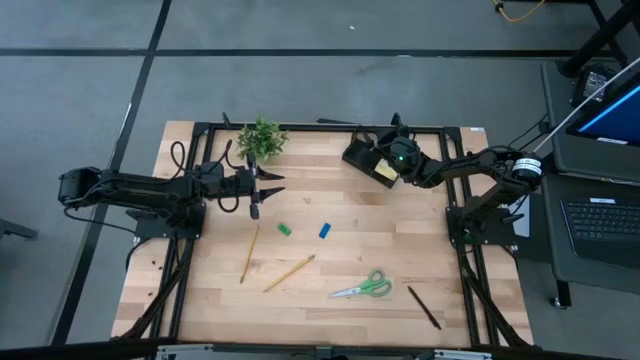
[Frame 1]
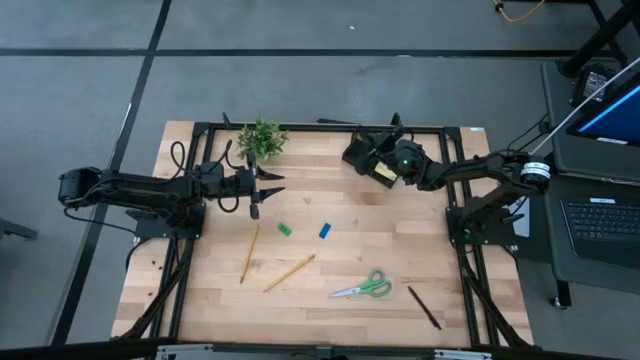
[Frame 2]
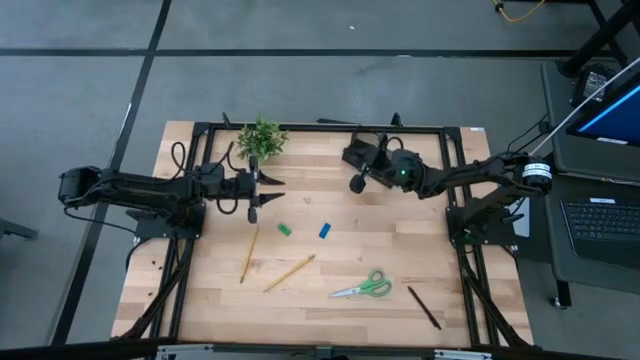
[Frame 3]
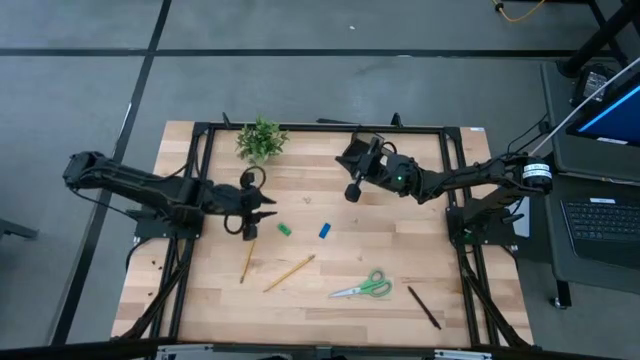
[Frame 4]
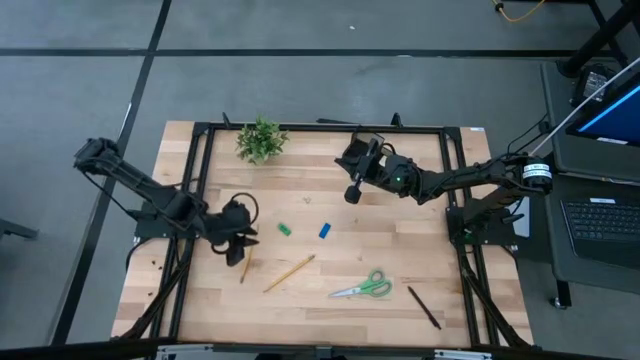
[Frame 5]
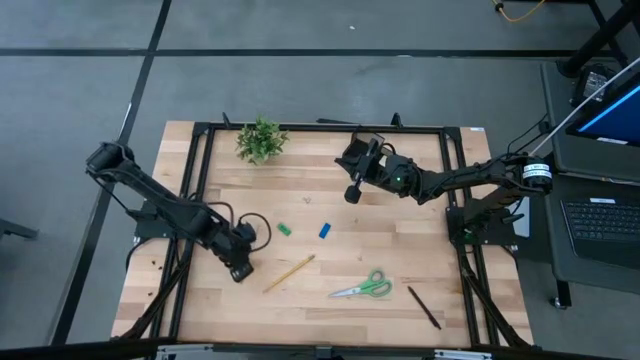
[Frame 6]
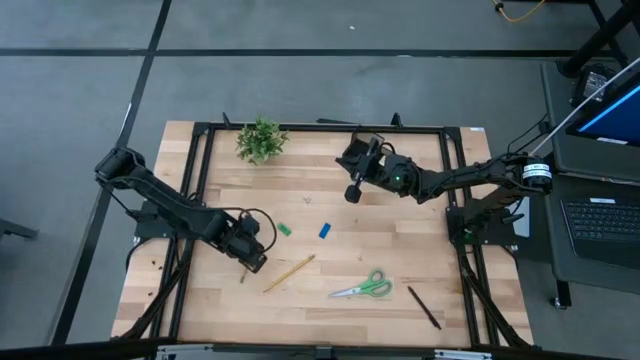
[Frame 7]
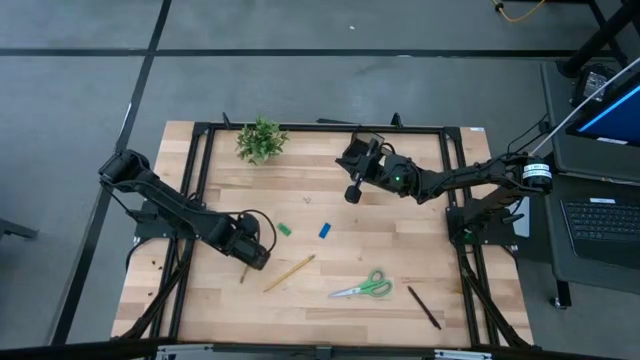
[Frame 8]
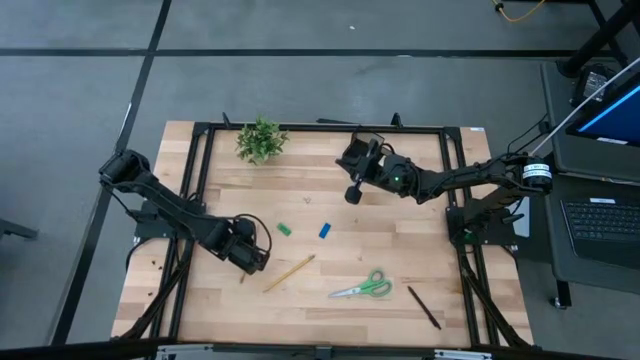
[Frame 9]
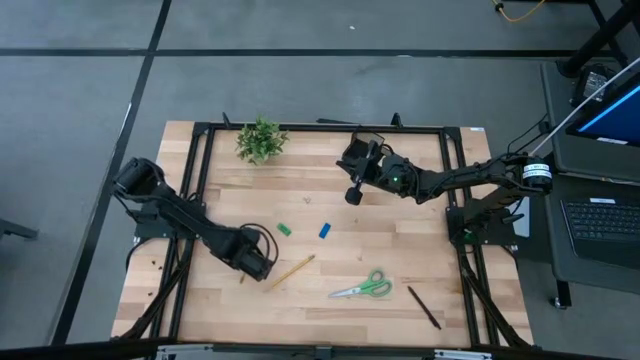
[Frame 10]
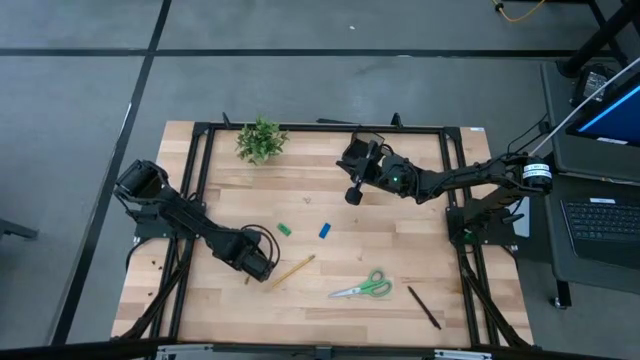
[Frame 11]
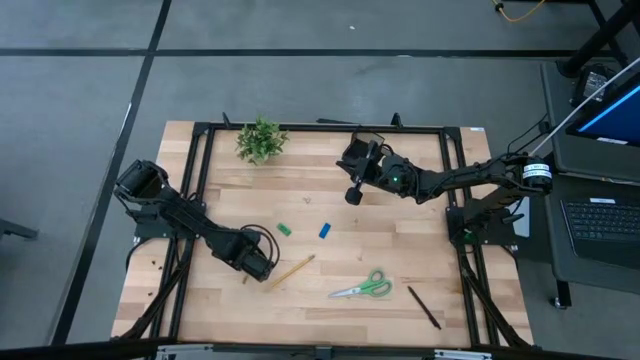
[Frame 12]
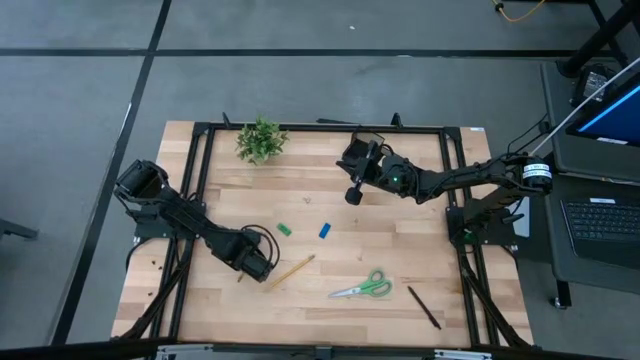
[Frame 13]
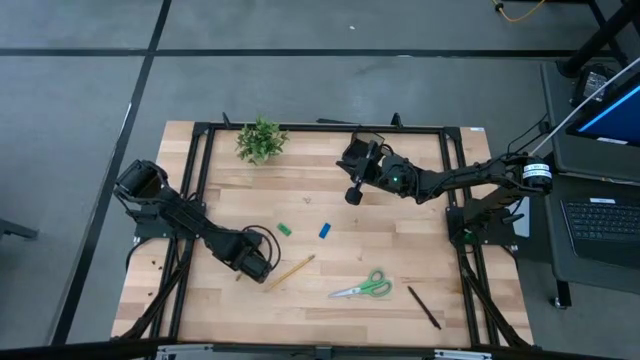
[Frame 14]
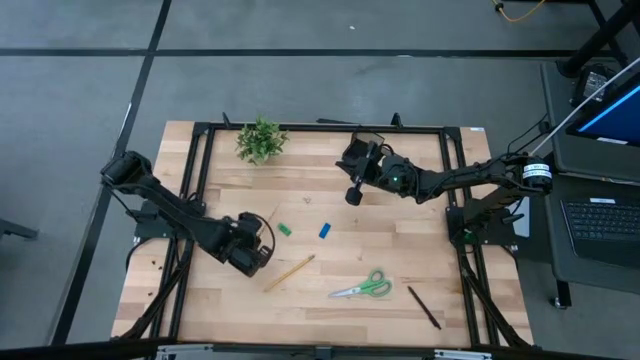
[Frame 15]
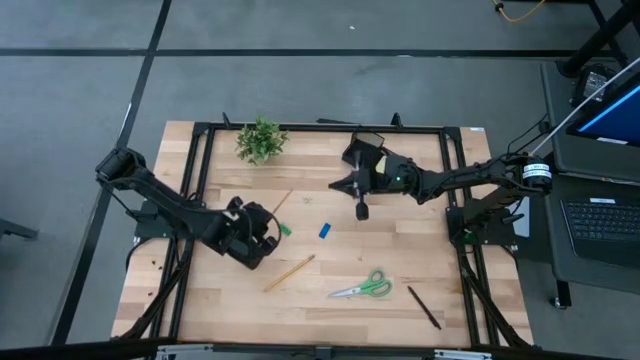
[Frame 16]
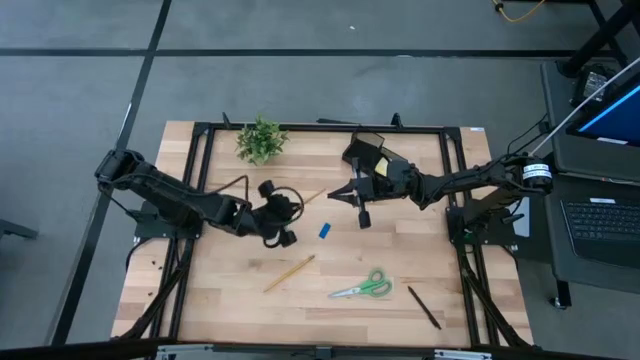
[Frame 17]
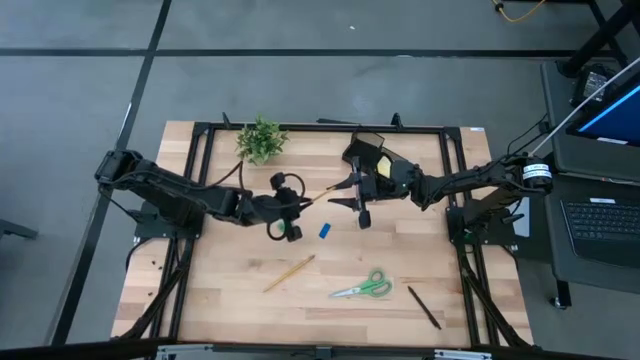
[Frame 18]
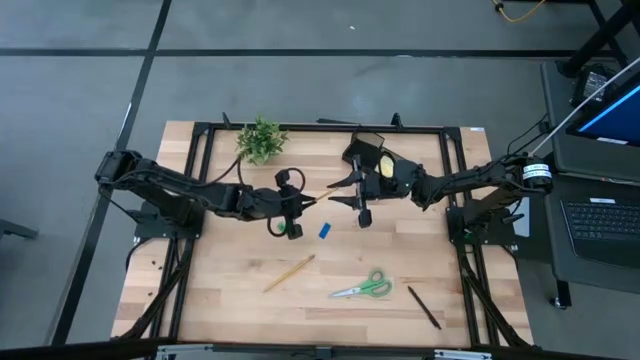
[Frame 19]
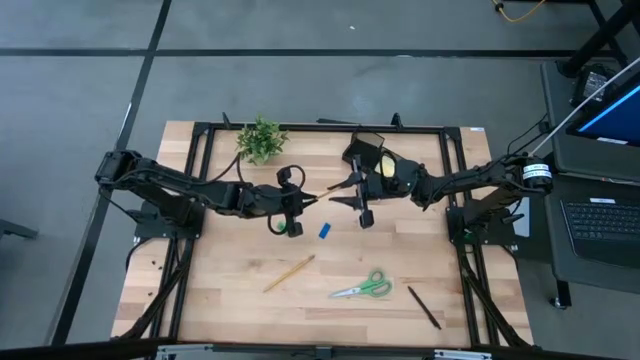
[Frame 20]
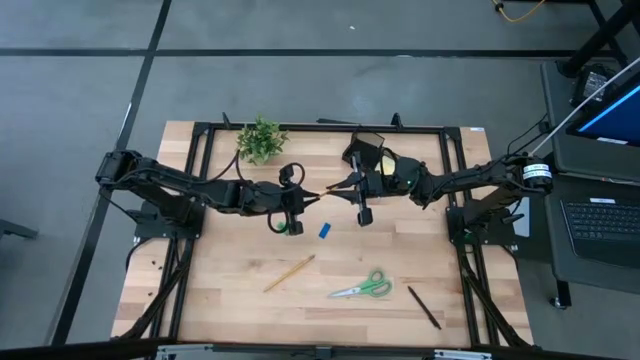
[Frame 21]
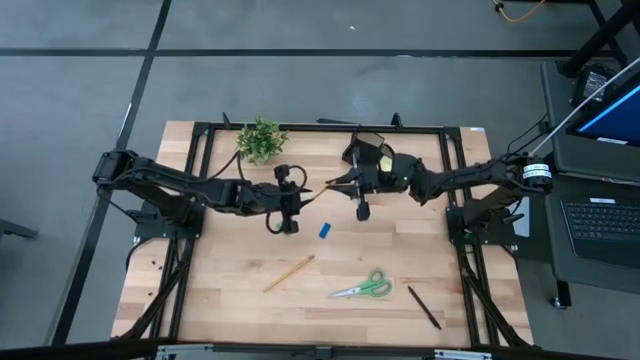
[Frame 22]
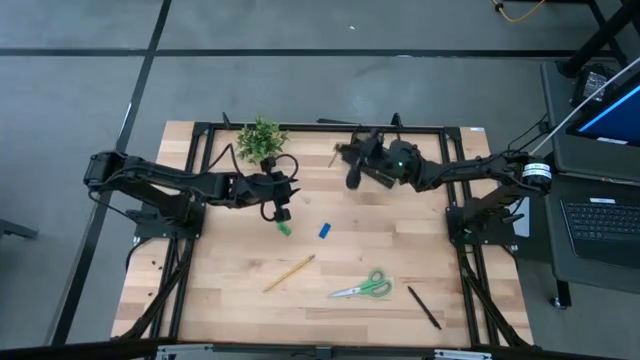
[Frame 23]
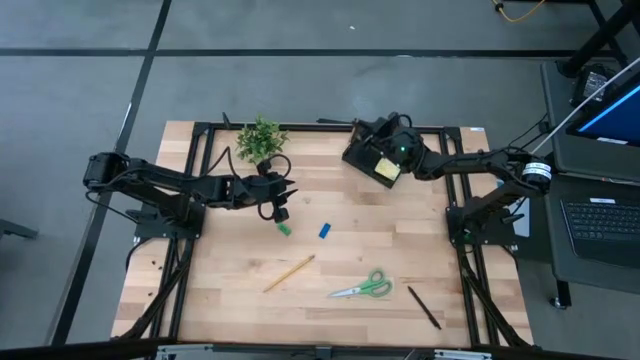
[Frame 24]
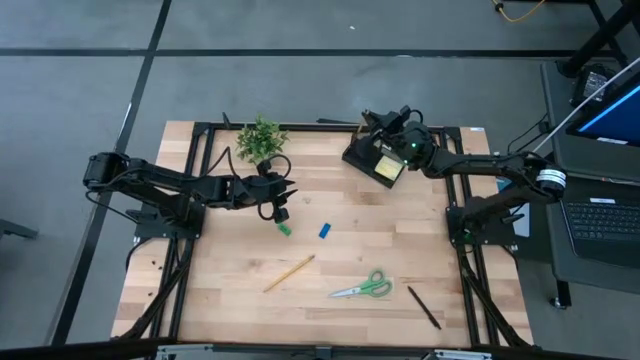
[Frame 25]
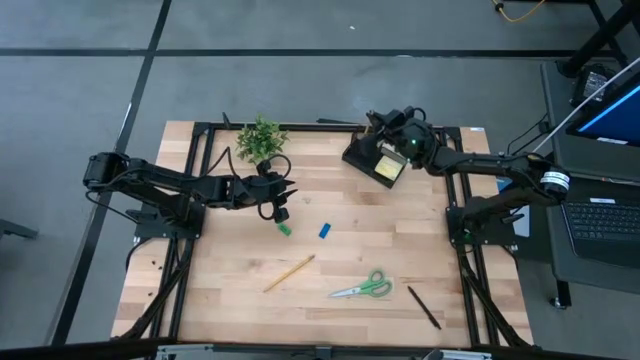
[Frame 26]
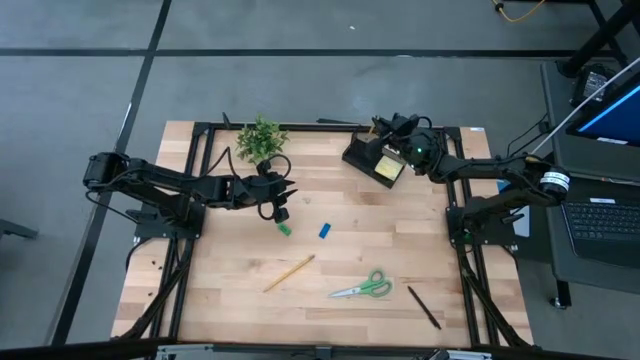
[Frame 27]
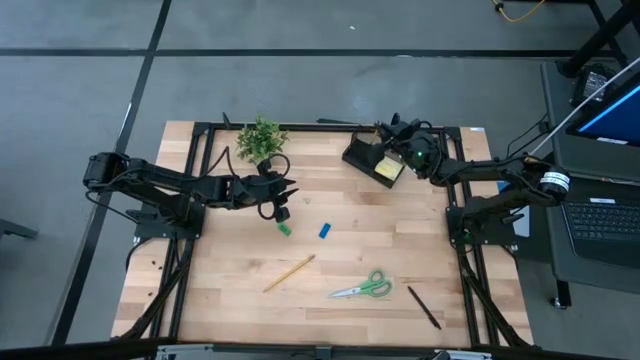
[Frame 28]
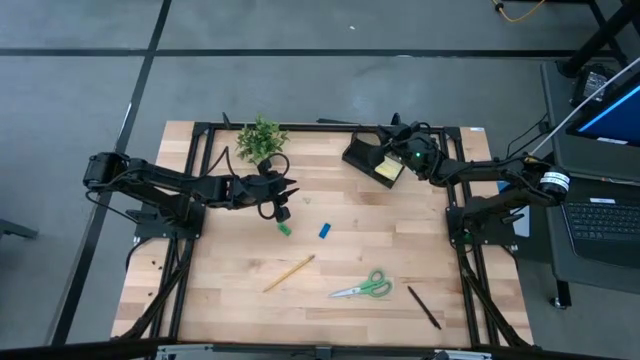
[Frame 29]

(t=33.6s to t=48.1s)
Task: Pick and place office supplies into organizer
Put the left yellow pencil into the black desk organizer

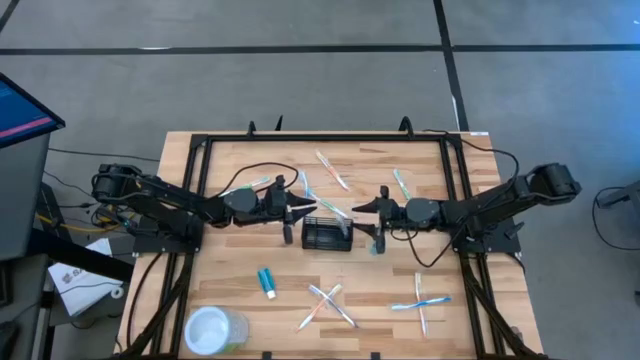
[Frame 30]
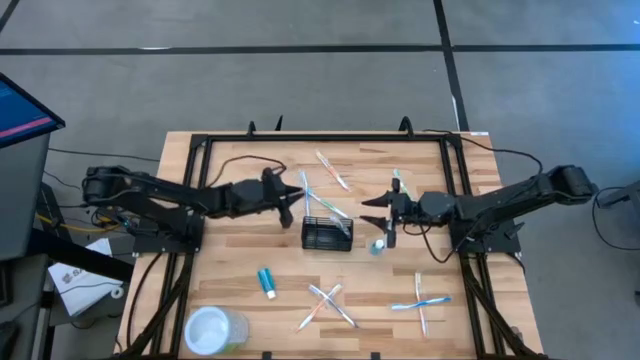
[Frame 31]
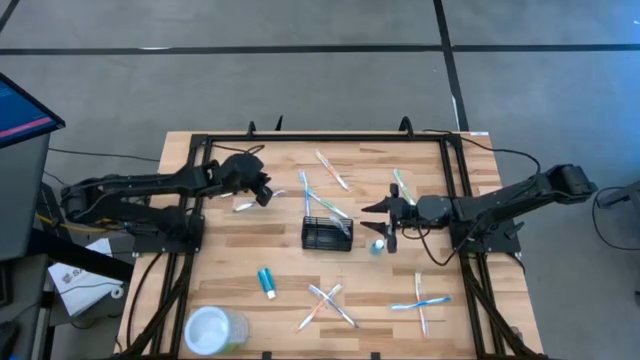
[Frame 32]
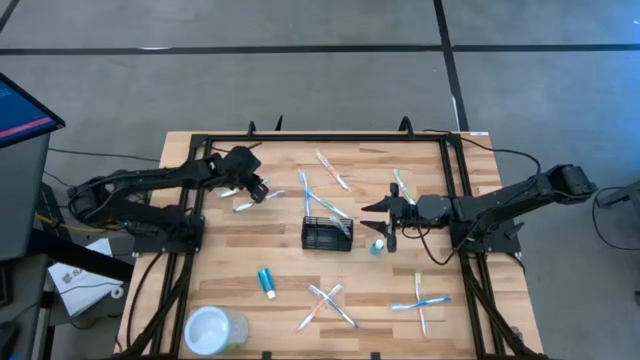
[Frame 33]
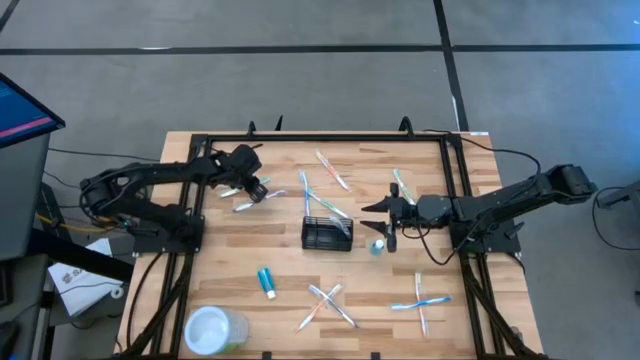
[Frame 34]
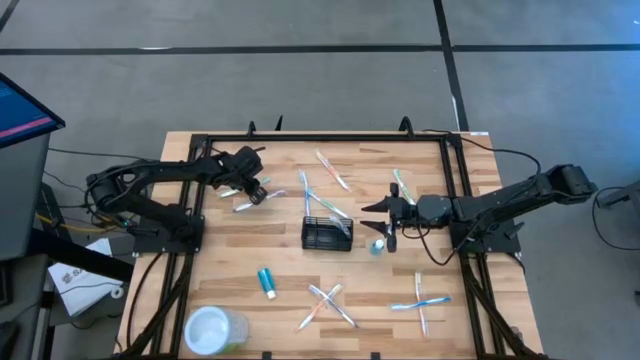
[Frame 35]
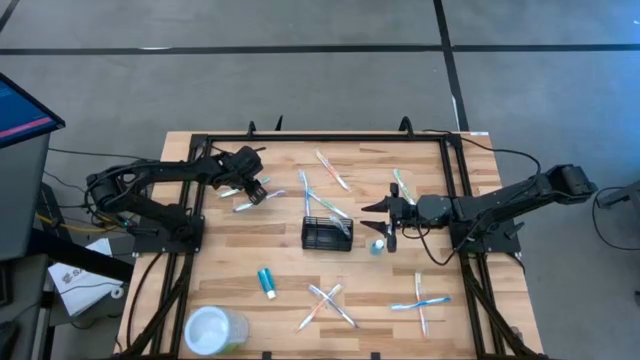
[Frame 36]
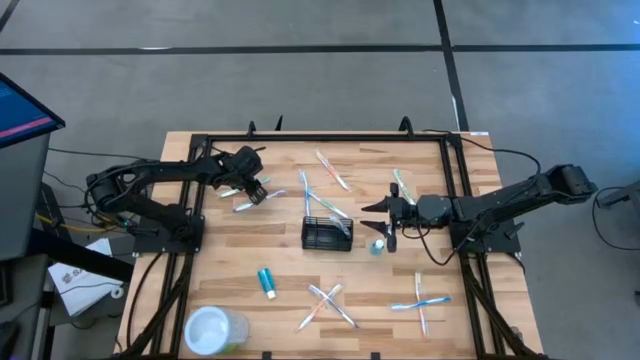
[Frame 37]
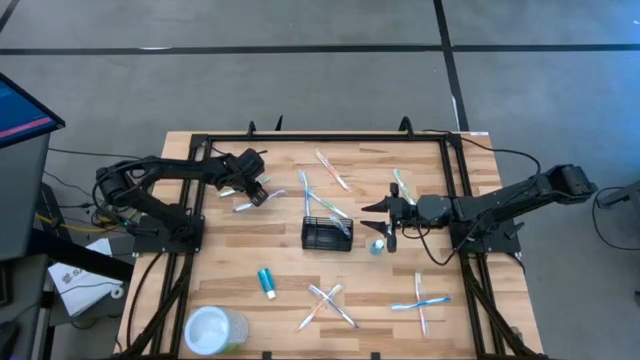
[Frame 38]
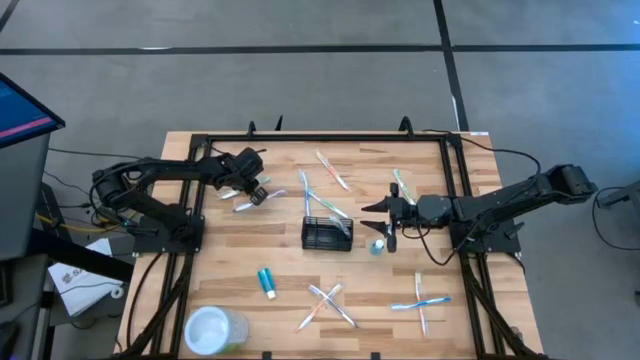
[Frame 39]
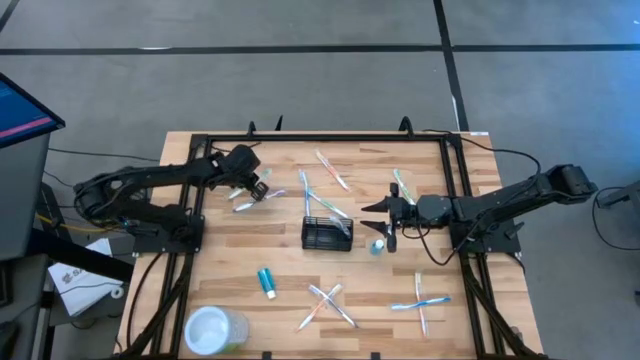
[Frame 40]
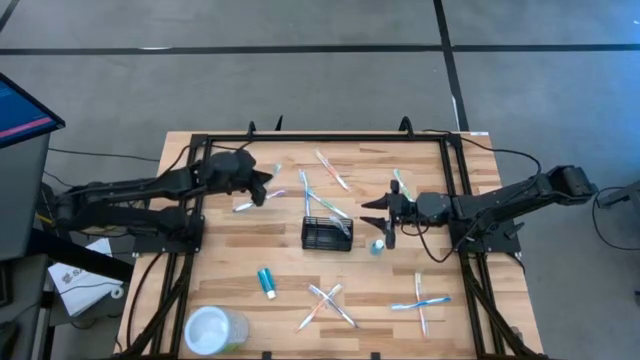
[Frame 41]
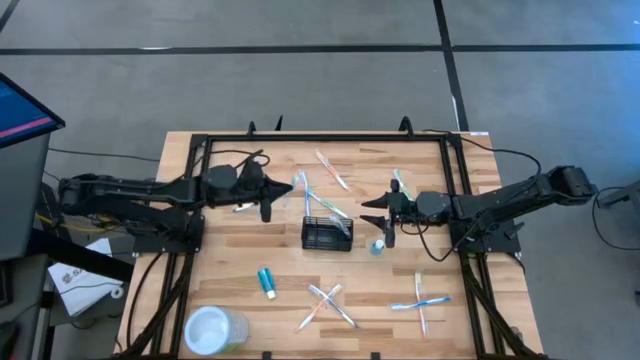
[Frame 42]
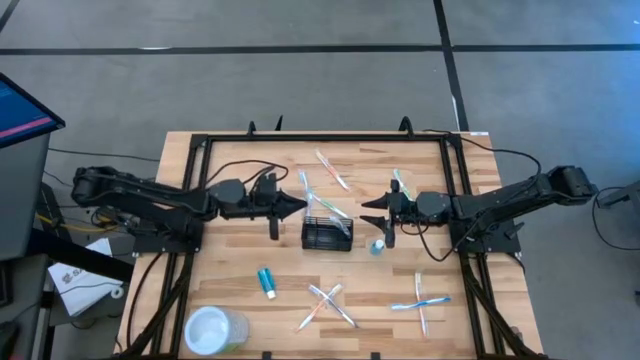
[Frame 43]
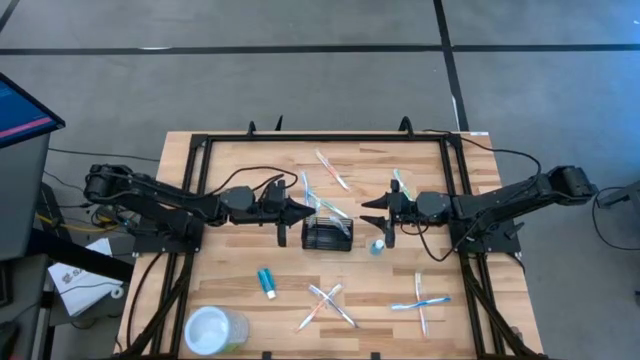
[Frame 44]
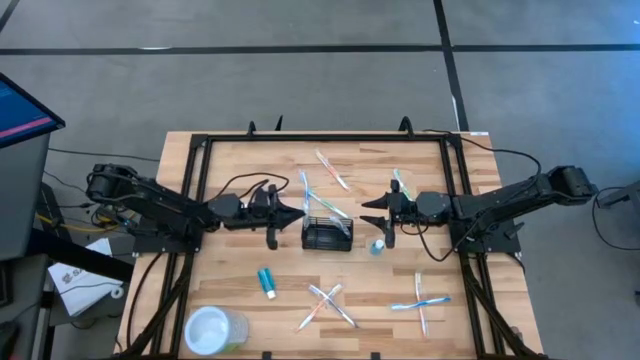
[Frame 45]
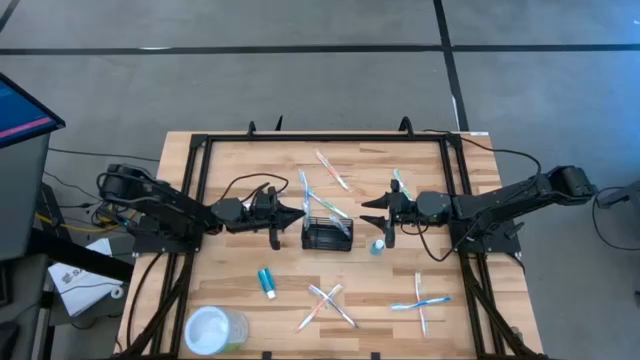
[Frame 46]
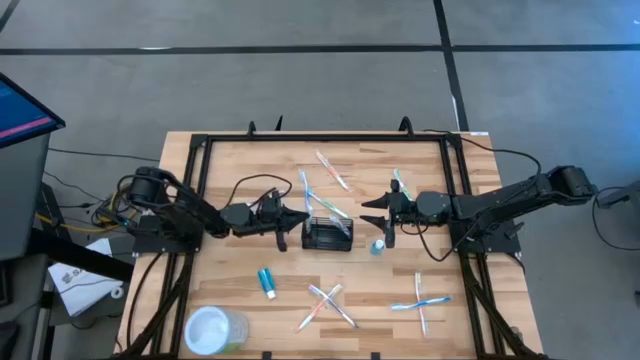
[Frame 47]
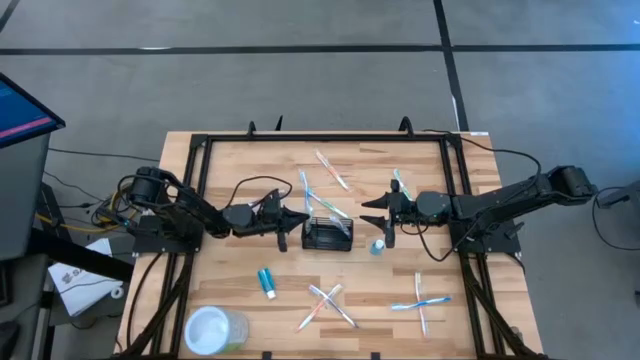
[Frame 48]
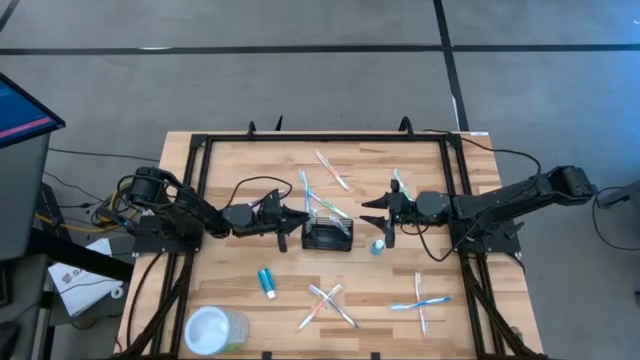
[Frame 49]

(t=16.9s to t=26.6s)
Task: Pick & Place toothbrushing station
Put the left green toothbrush into the wire organizer
